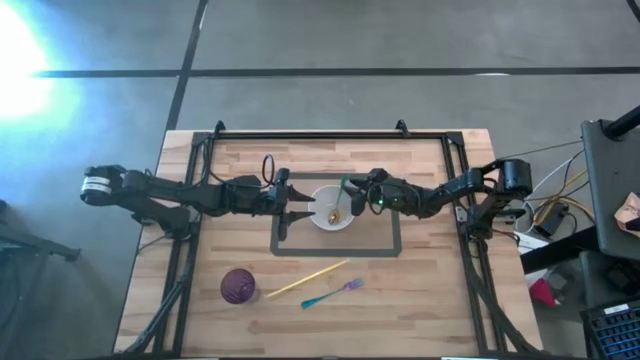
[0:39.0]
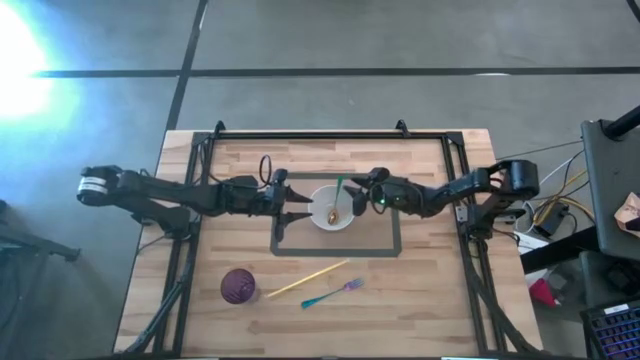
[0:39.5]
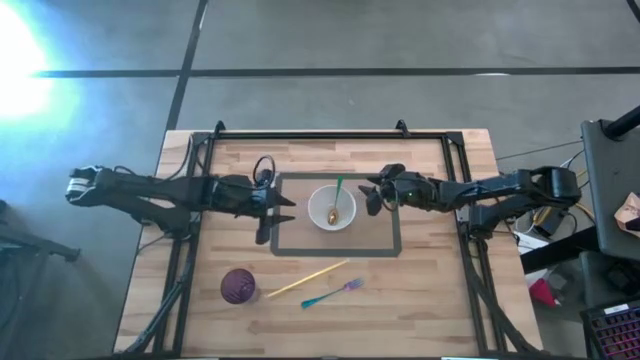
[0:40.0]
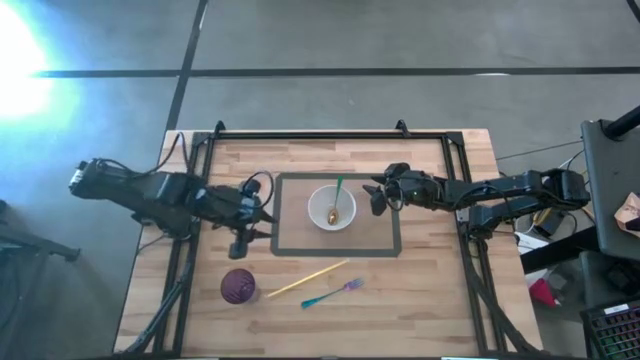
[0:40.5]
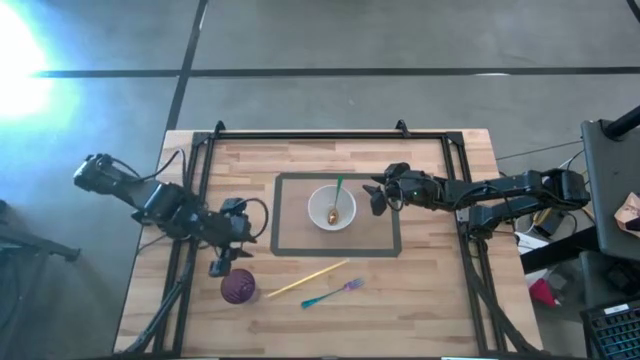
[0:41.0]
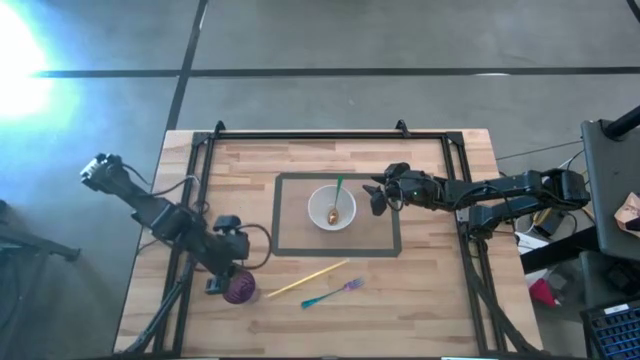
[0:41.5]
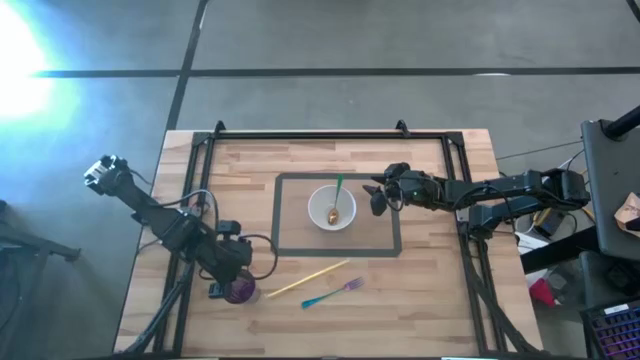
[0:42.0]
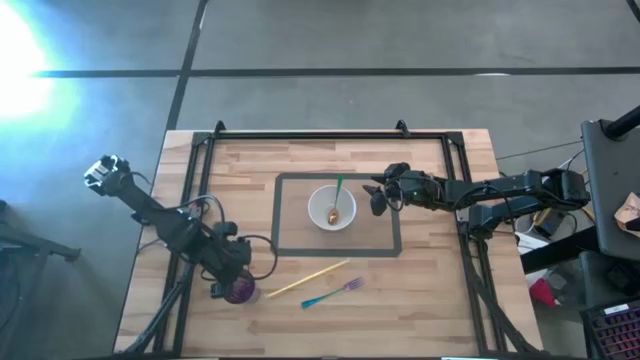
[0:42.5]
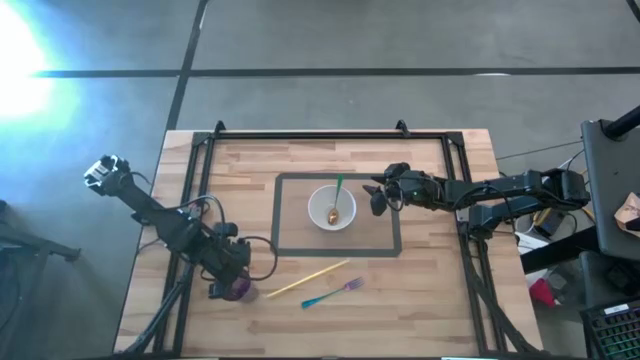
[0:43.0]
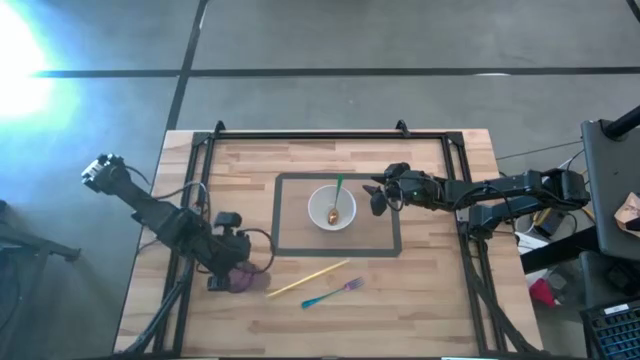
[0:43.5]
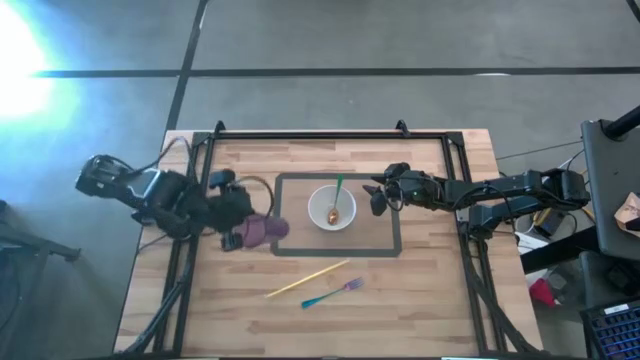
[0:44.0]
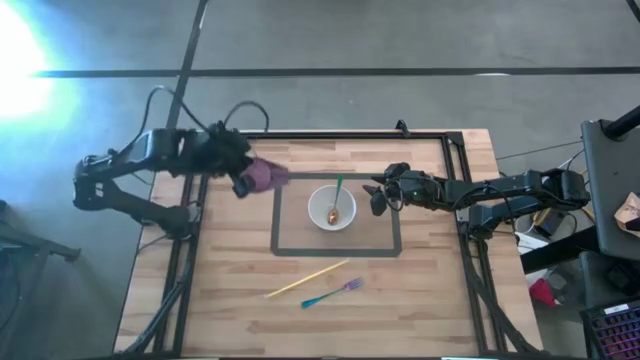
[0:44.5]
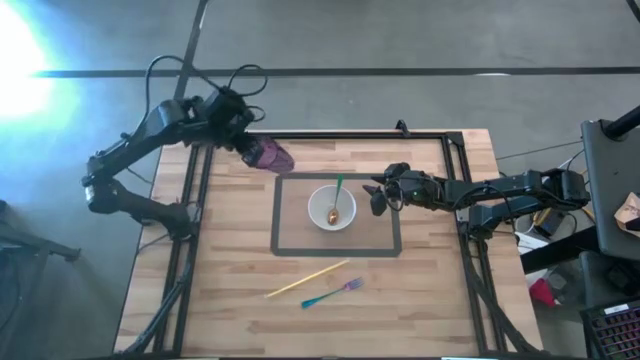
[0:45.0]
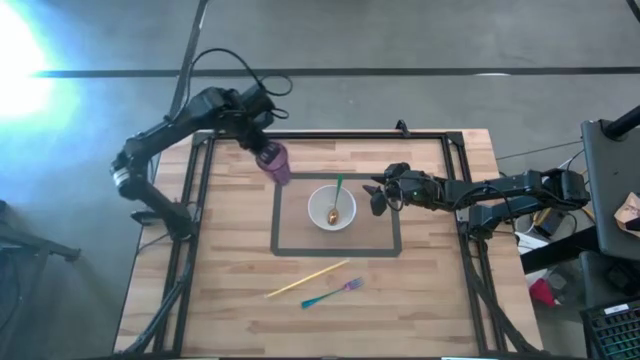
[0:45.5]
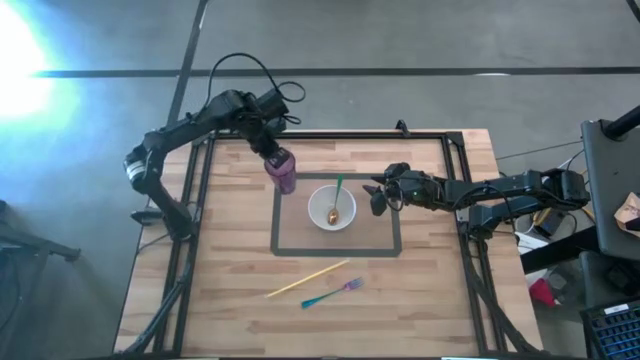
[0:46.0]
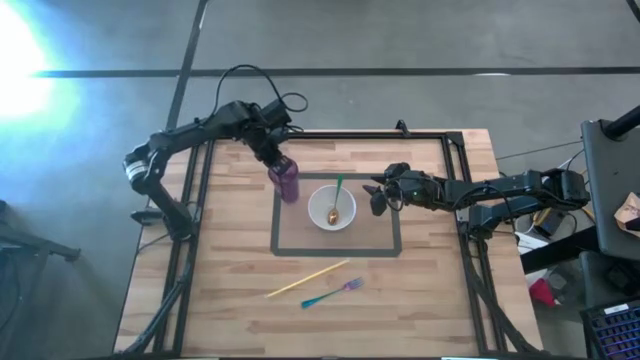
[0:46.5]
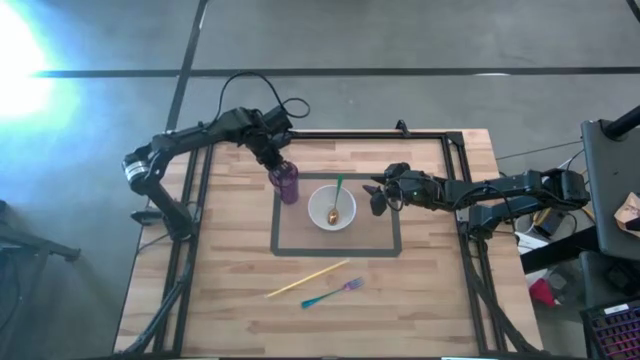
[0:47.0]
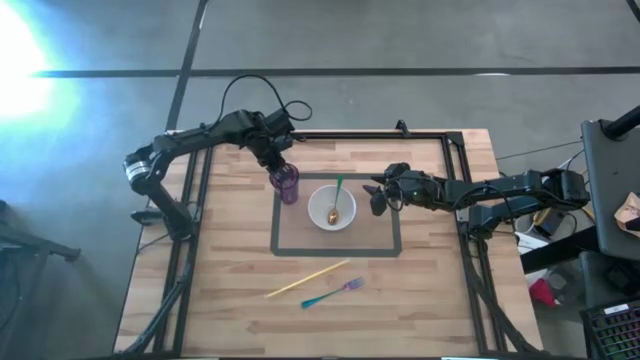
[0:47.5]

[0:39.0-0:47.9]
Task: Pick & Place Utensil
Put the purple glass on the top left of the white bowl on the brown placemat

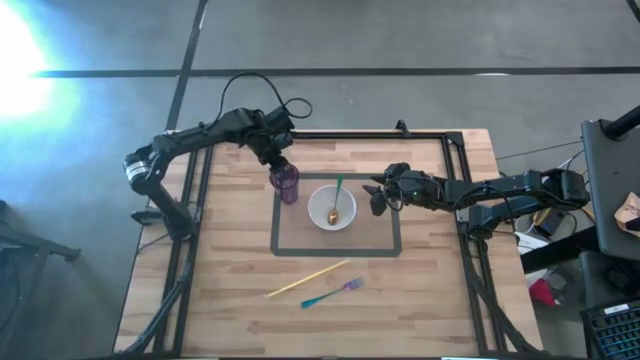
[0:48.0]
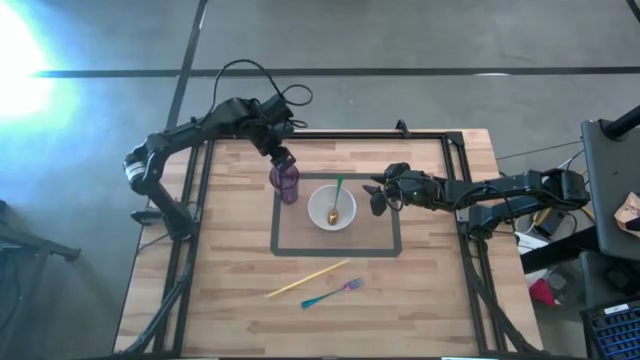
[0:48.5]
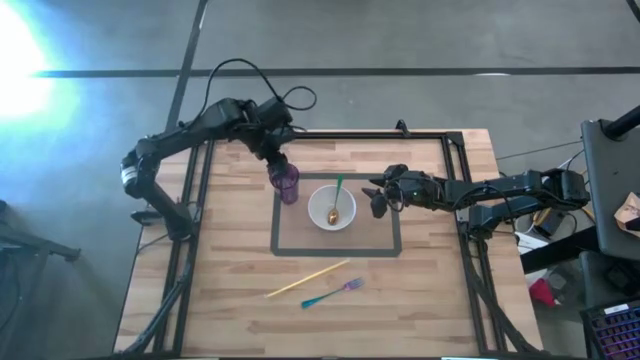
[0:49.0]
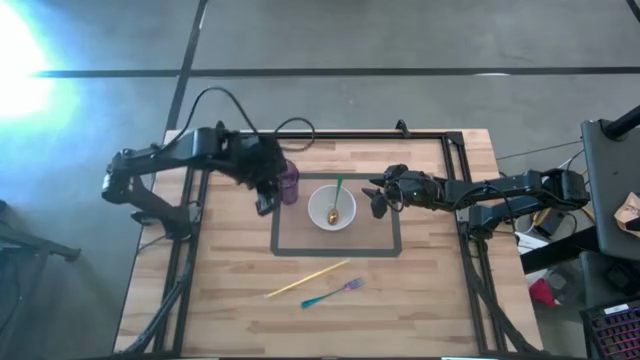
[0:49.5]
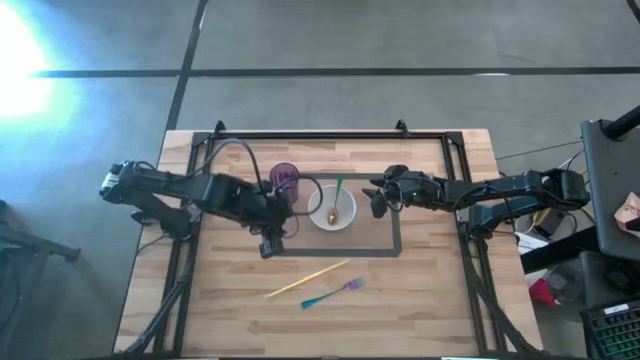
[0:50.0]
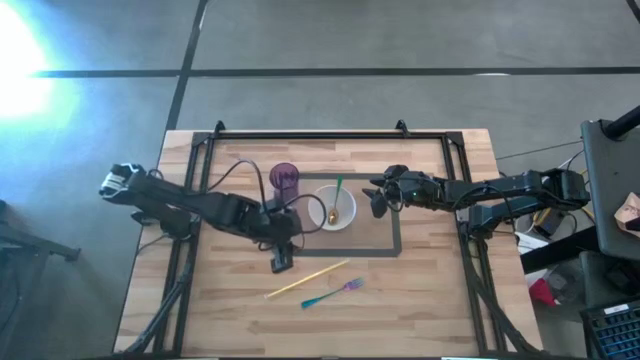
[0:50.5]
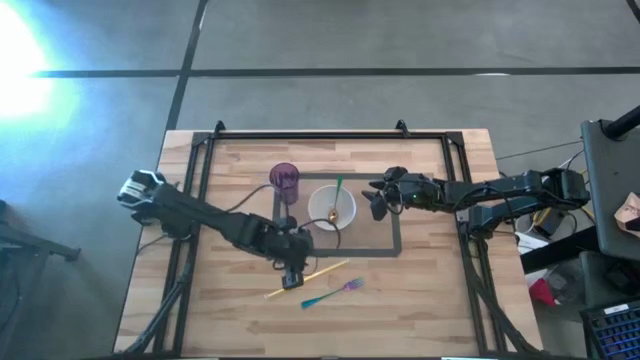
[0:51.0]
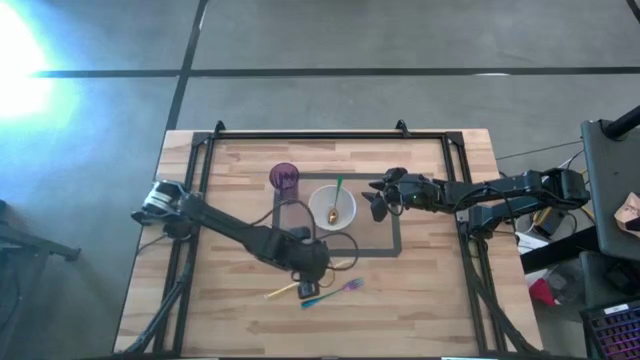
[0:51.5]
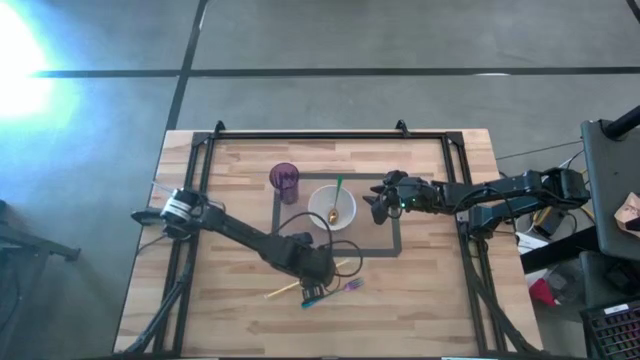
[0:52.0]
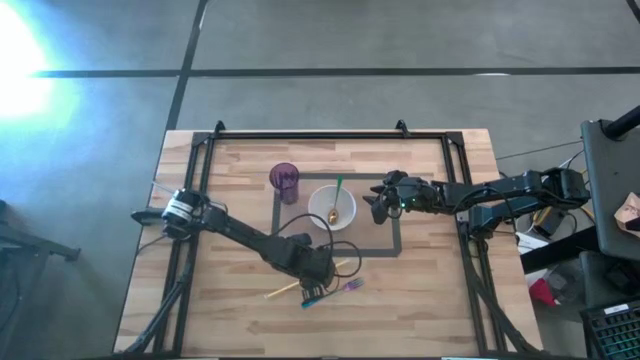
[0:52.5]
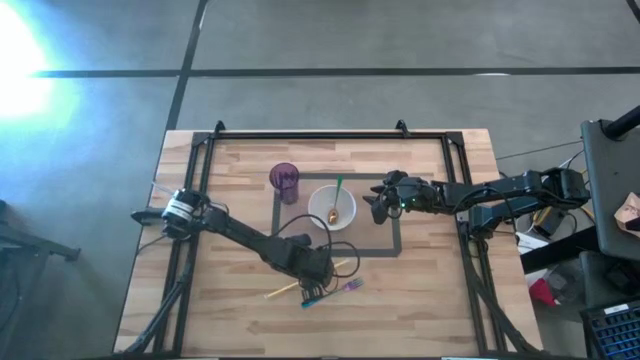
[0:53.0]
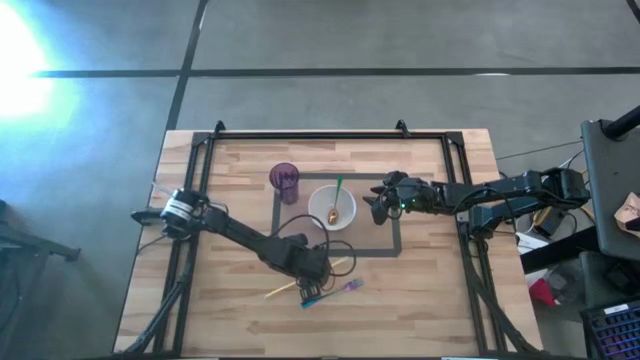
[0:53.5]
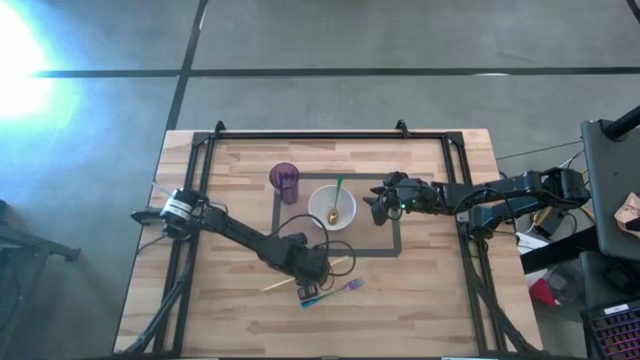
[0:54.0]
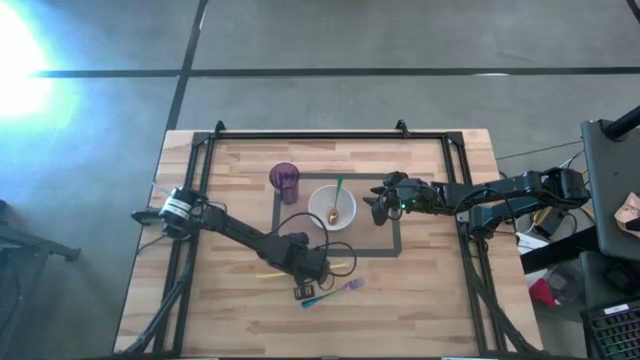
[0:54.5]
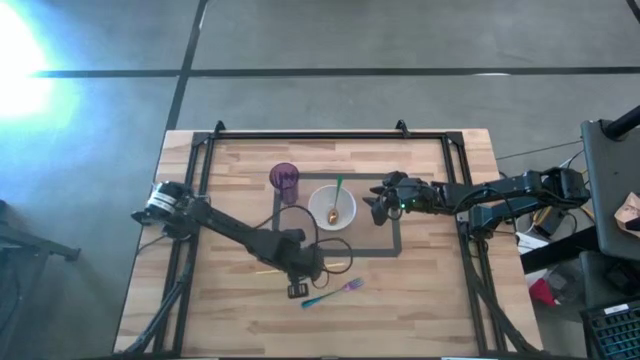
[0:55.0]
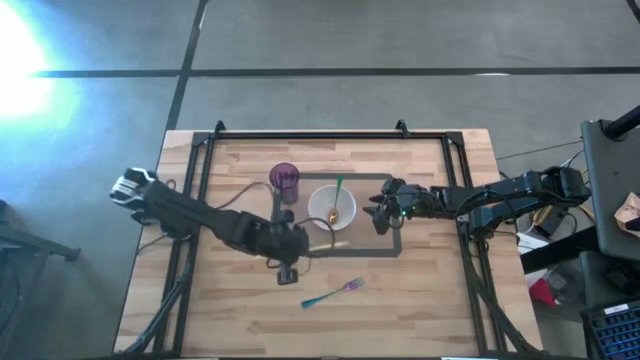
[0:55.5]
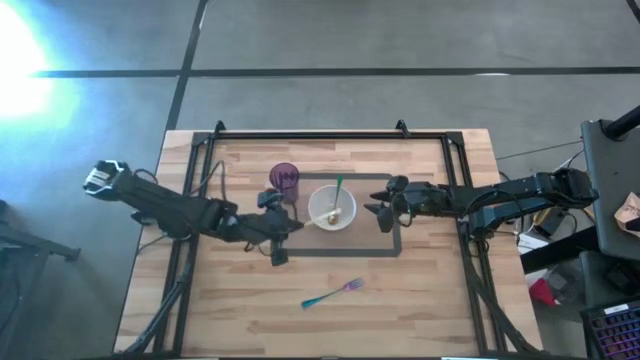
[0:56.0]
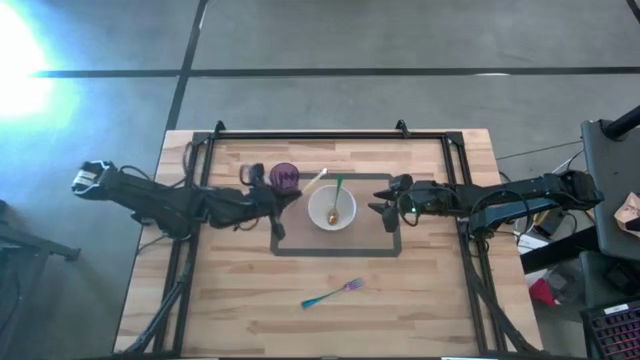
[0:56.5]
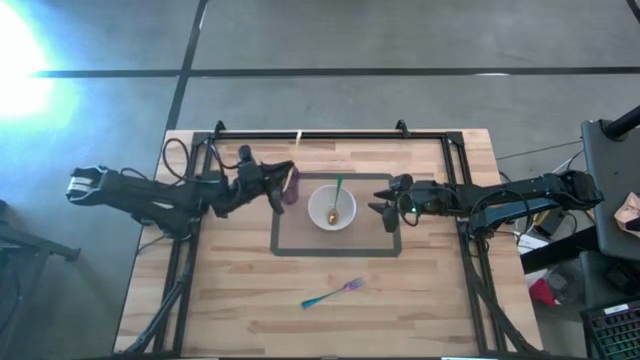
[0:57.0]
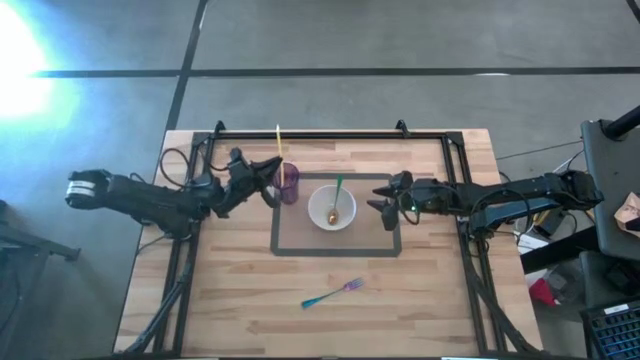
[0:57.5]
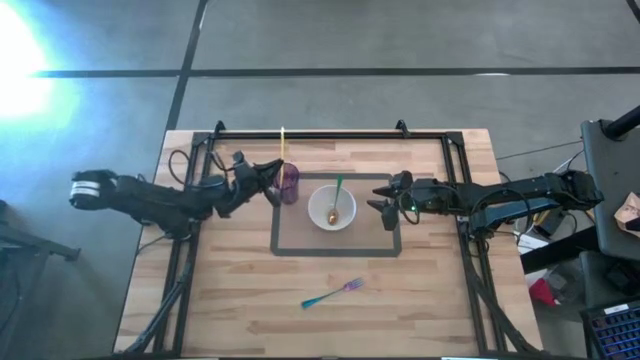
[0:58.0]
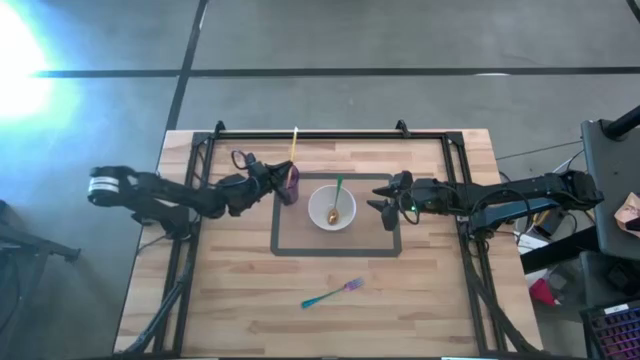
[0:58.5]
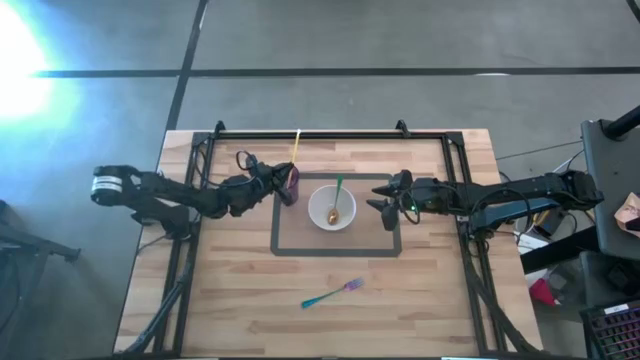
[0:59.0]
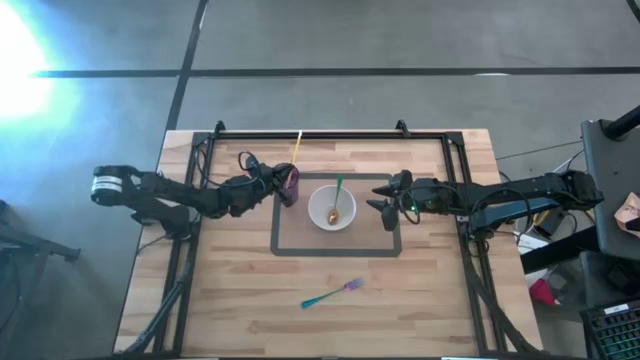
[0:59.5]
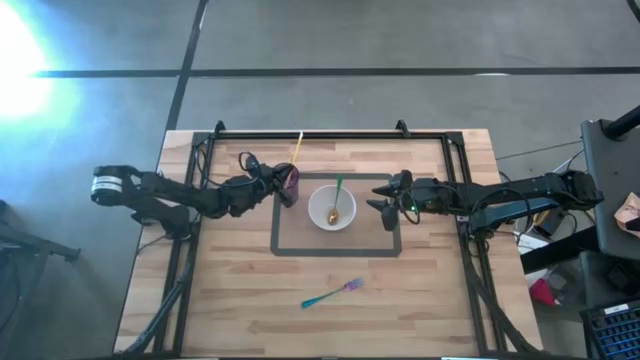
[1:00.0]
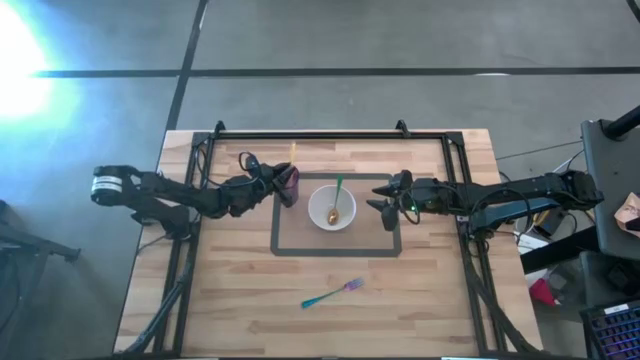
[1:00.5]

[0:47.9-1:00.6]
Put the yellow straw into the purple glass on the brown placemat
